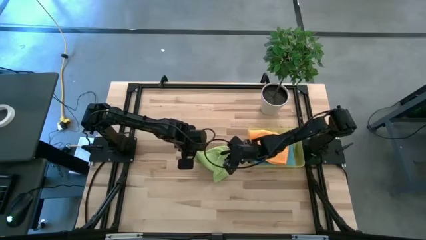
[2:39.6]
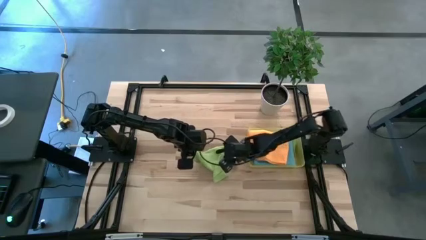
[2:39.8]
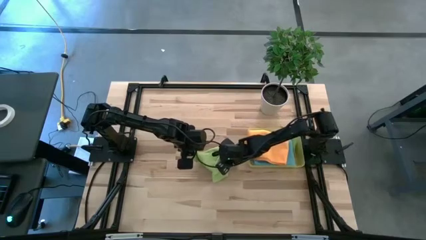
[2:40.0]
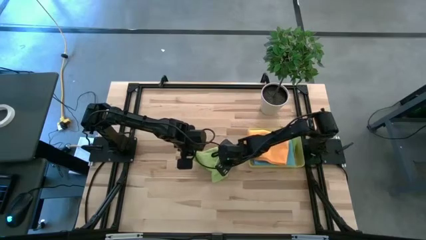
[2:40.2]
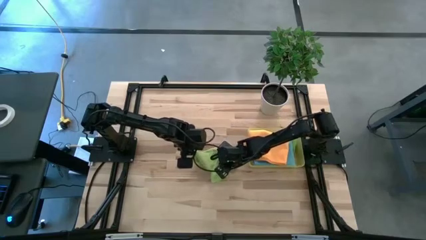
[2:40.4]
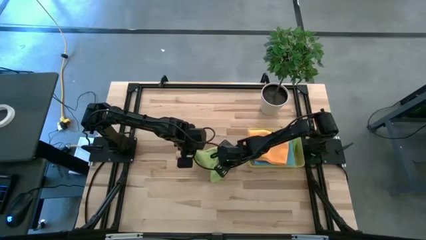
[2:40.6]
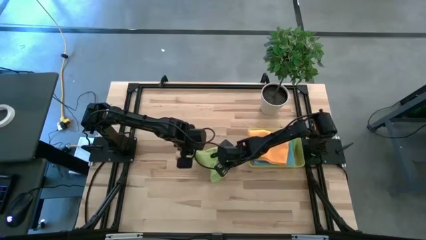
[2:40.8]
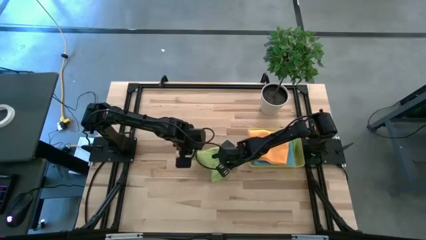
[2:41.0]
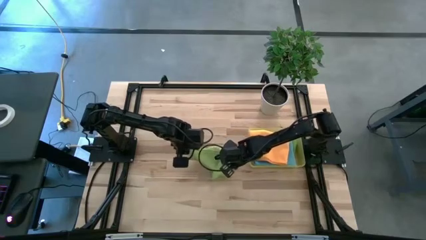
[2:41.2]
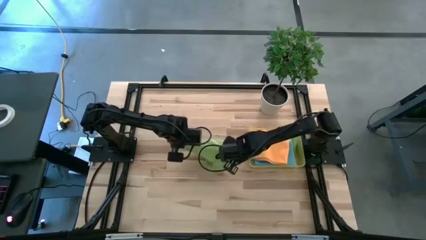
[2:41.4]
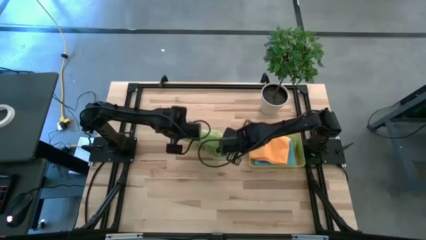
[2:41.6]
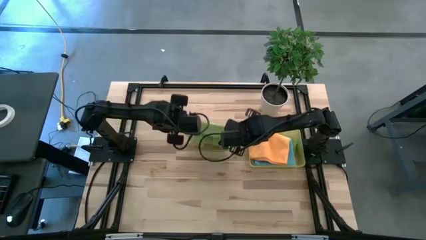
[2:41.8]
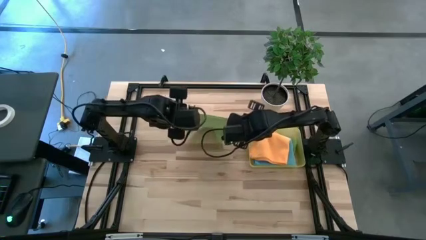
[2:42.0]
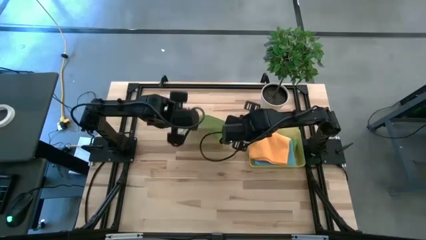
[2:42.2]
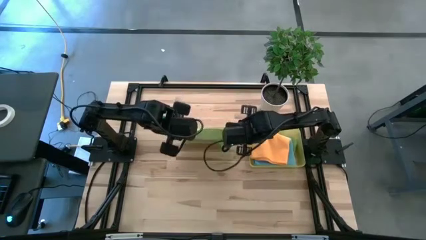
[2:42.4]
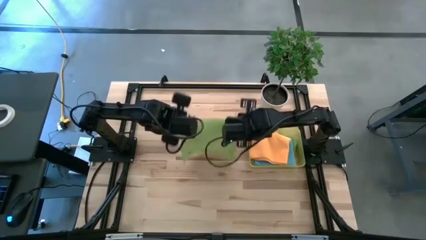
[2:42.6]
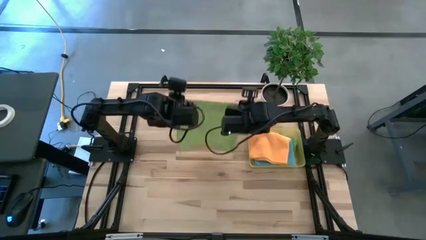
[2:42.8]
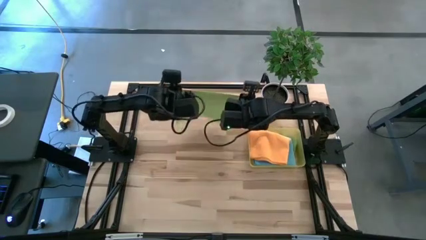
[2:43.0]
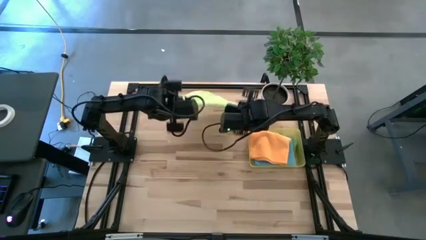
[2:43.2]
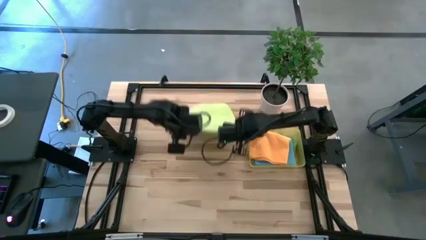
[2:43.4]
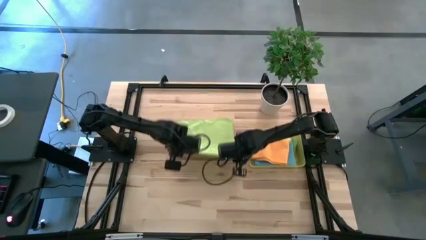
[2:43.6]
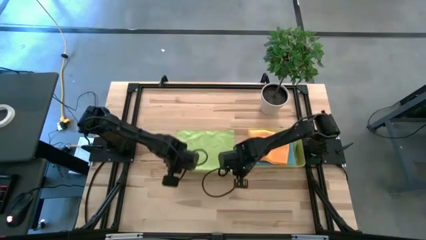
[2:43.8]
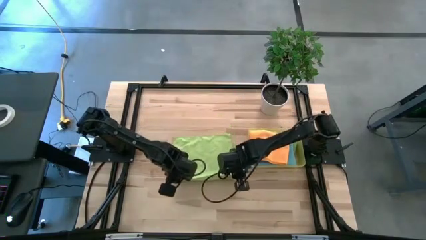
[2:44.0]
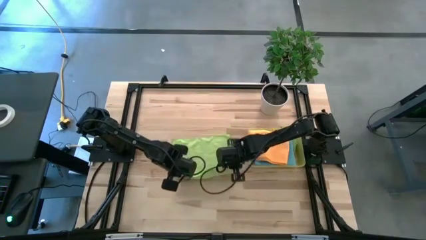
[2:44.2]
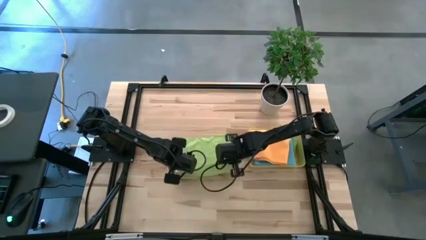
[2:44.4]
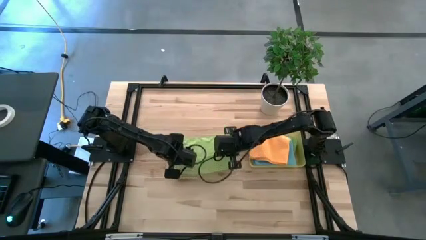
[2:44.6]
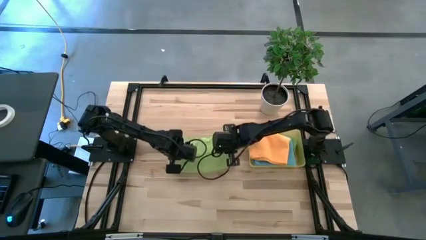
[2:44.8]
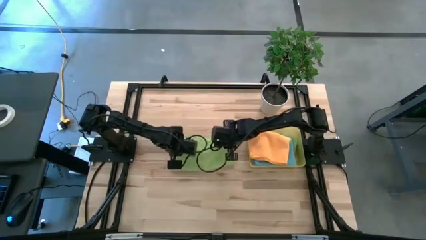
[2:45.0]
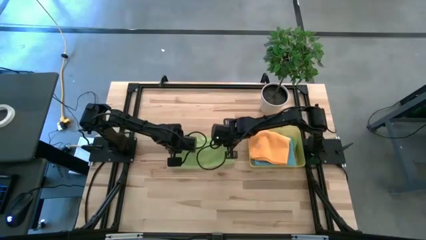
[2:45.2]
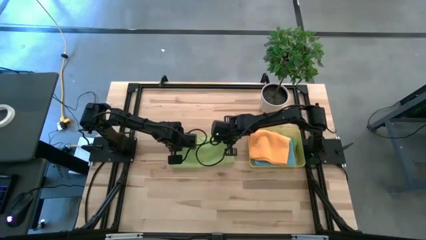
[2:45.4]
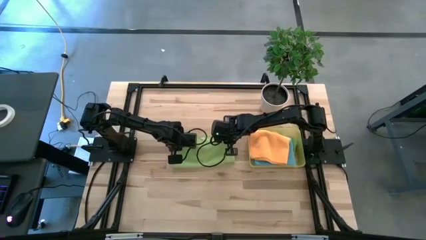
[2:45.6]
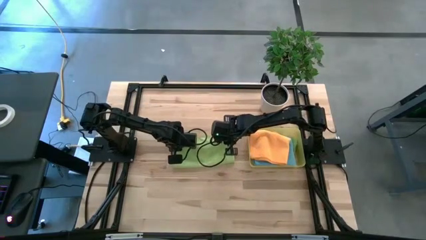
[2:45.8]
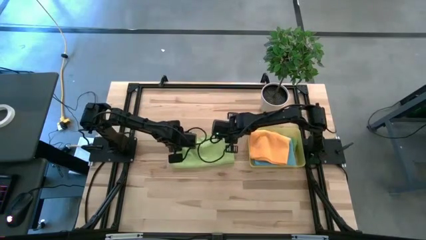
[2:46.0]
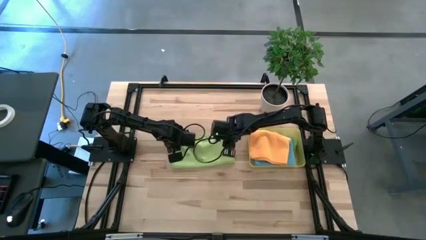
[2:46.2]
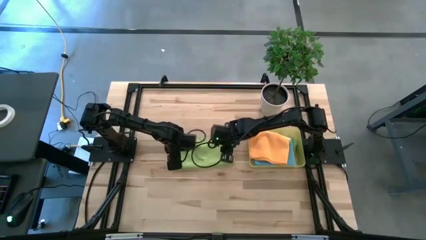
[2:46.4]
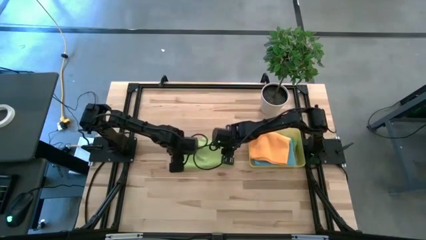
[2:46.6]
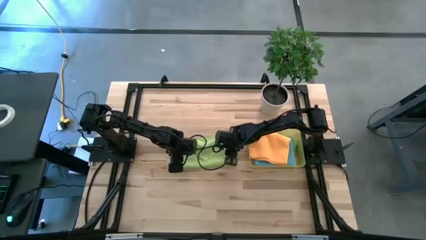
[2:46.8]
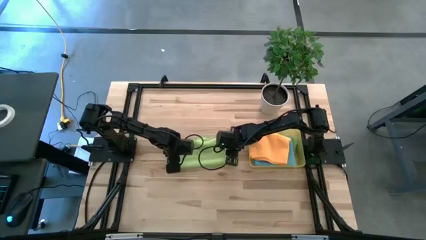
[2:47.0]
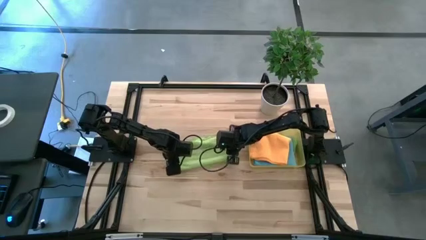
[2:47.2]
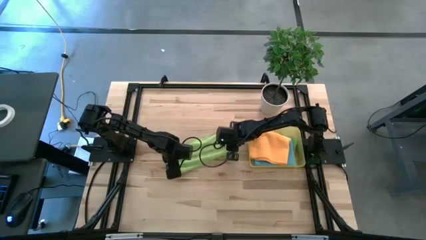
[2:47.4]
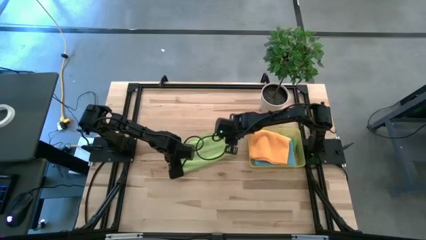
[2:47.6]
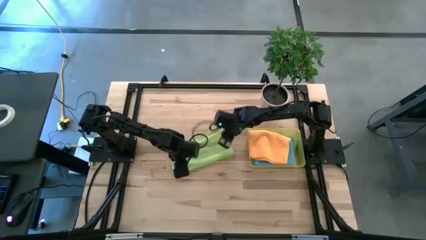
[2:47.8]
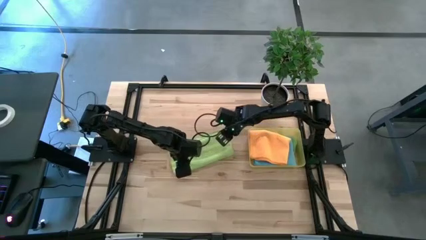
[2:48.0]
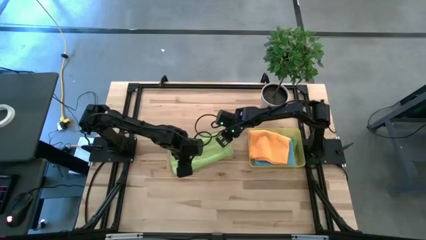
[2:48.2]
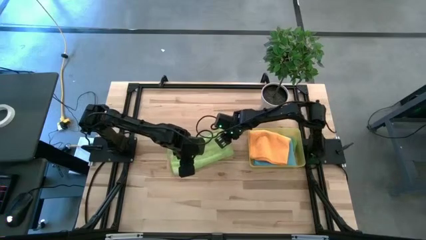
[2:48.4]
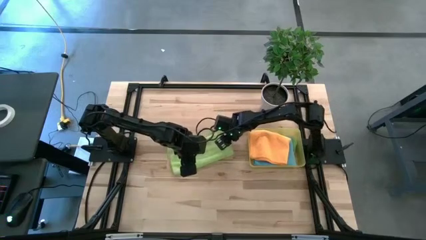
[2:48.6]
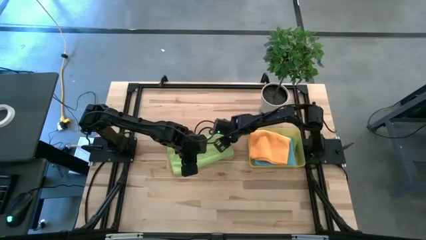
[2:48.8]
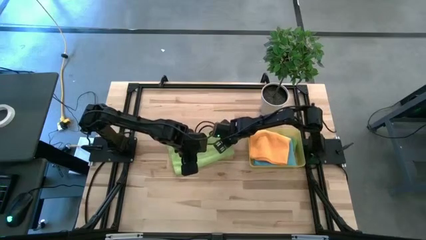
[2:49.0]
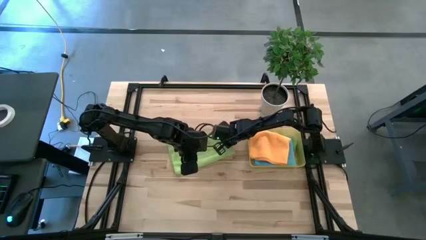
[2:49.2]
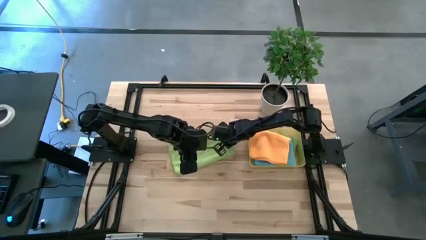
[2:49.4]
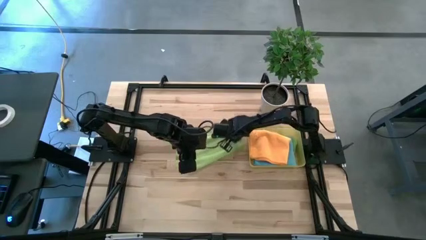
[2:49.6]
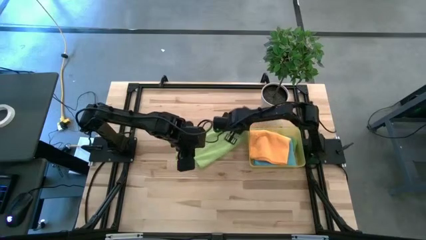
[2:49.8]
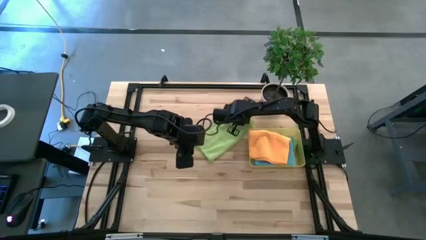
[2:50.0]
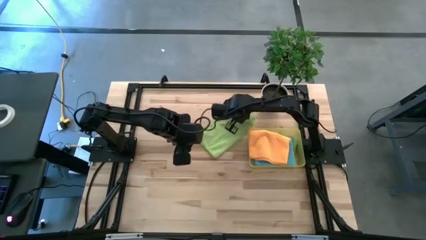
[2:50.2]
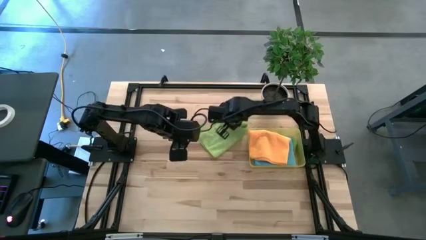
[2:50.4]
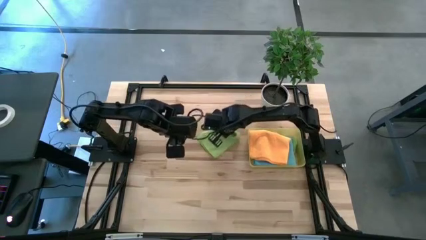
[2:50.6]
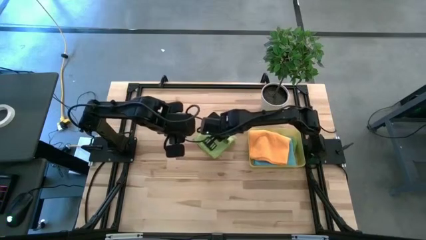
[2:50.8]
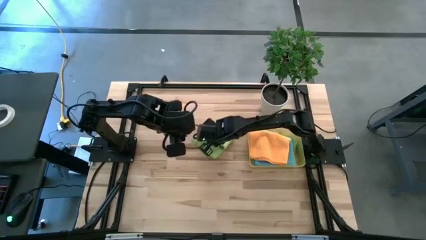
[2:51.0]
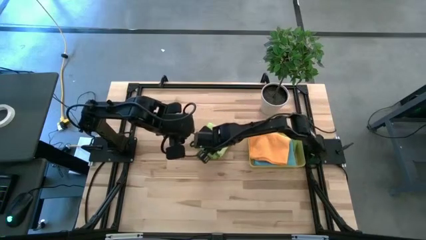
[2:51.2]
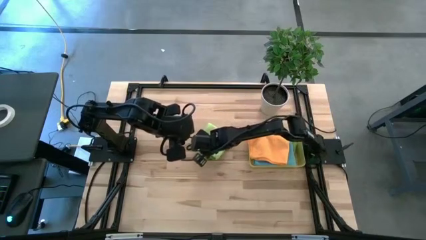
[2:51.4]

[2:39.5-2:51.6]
Task: Fold microfiber towels
Fold the green microfiber cloth

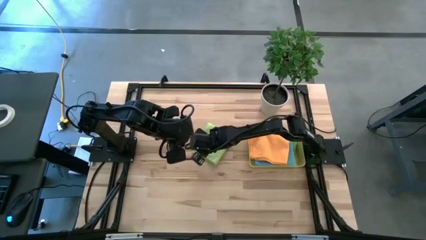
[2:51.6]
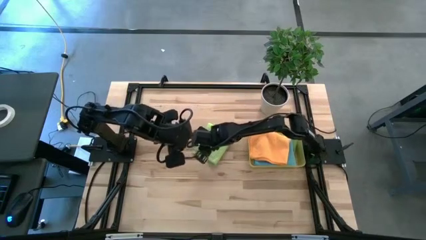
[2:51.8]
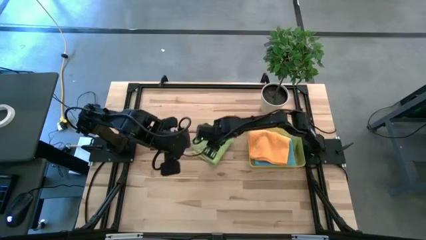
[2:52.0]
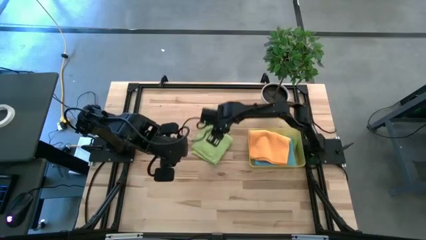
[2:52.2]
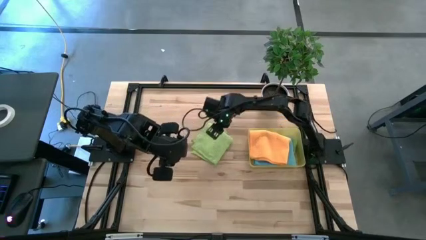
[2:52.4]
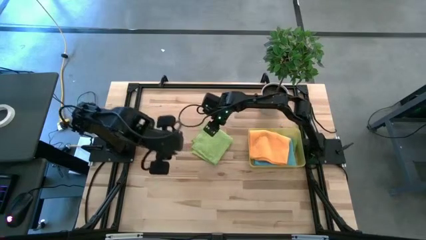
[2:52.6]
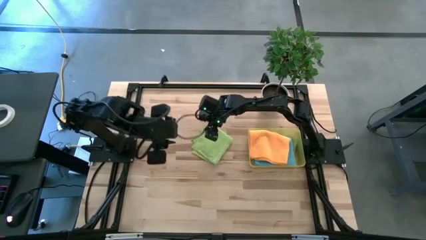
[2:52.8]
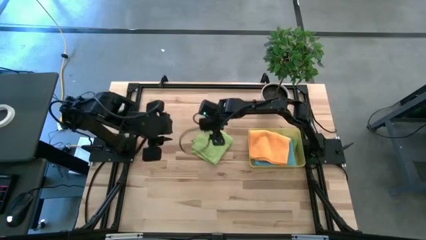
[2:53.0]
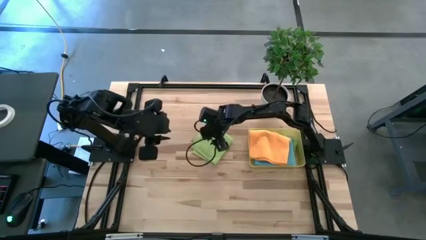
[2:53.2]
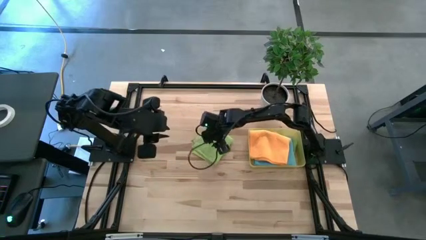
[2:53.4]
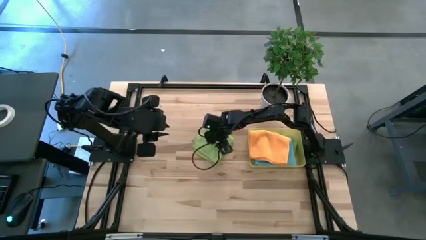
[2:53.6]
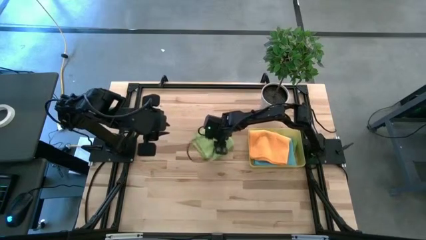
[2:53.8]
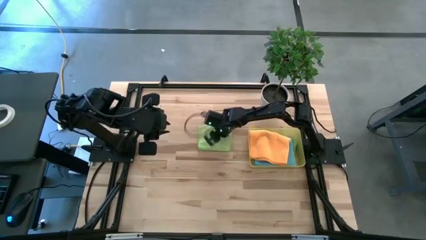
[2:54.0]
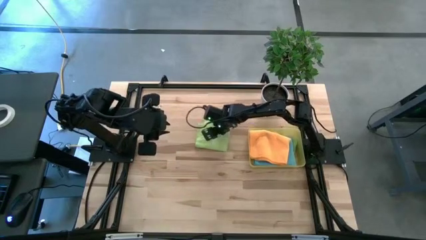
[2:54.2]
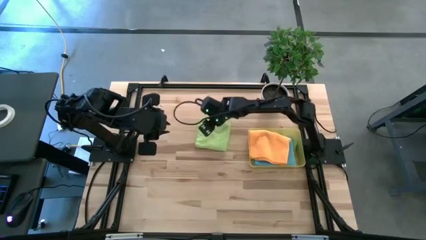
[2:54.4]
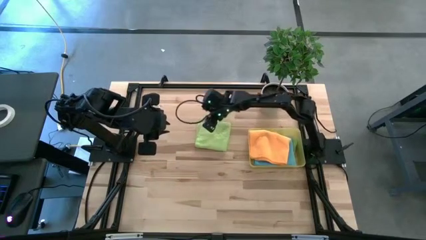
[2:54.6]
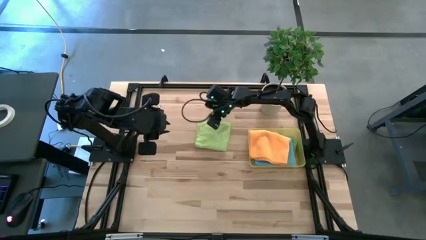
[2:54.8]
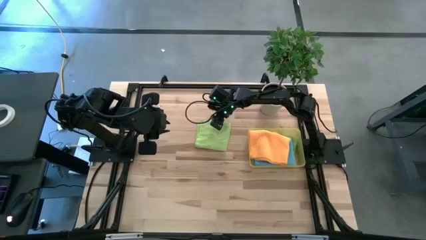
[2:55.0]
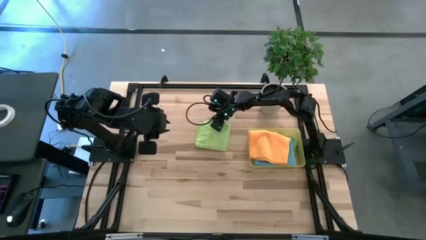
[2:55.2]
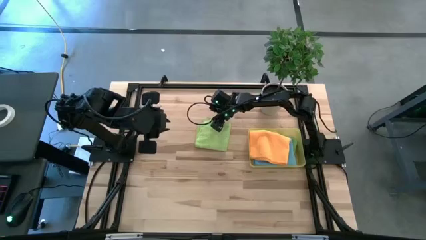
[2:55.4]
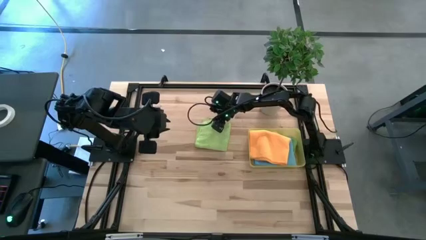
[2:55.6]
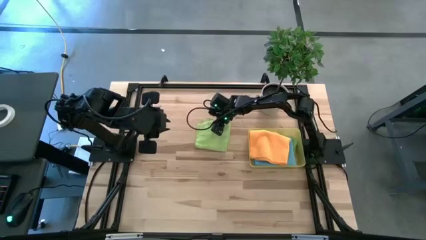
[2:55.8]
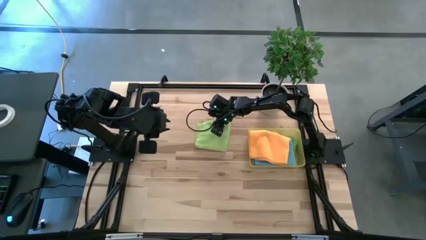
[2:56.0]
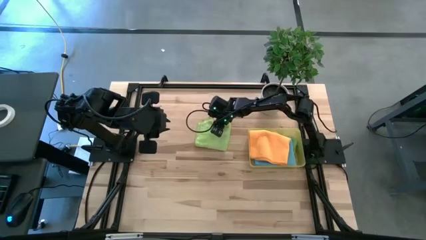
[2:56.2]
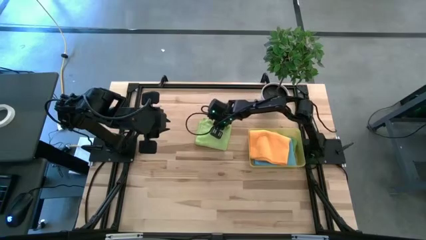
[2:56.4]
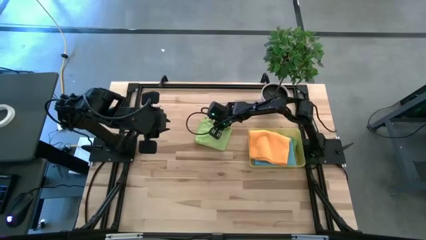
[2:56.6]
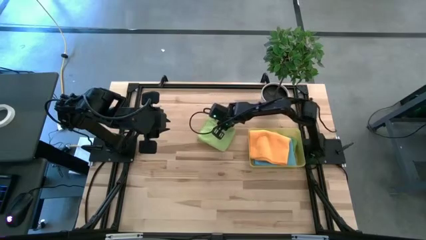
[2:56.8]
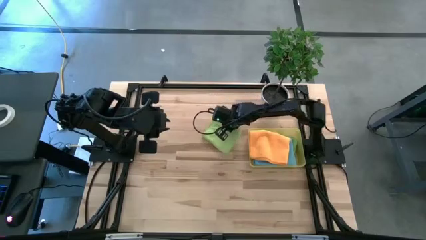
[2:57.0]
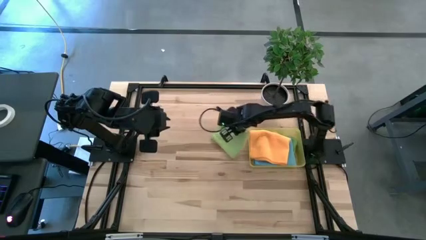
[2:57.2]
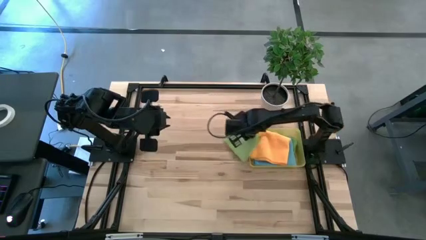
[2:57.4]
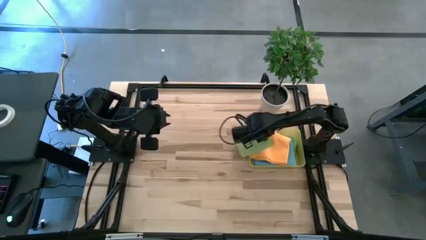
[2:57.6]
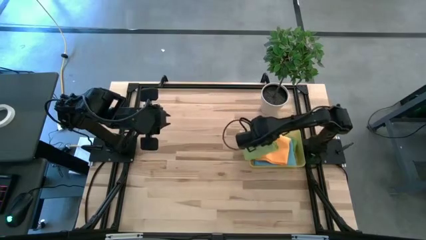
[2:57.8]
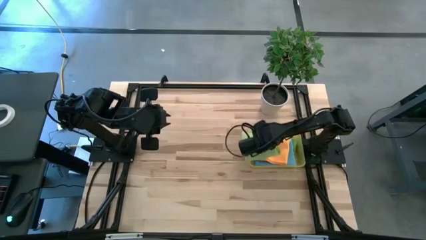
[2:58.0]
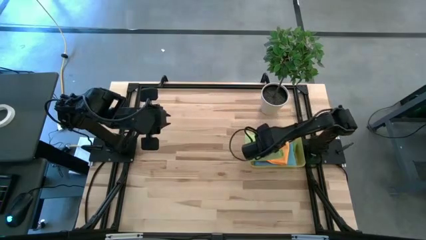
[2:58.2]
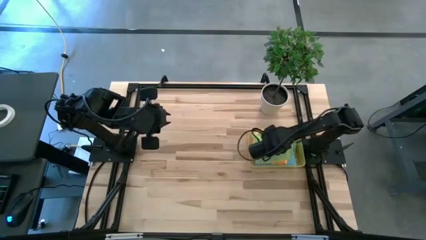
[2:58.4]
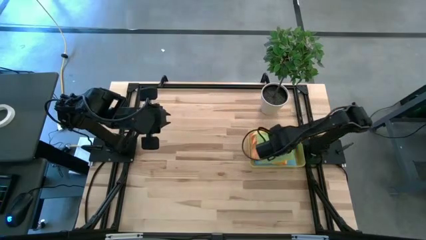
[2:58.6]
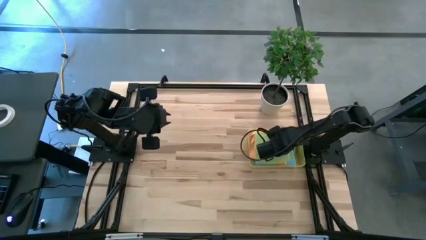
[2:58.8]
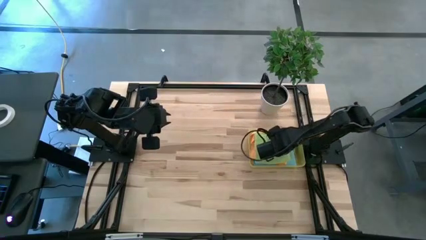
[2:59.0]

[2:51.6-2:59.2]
Put the green microfiber cloth into the yellow bin
